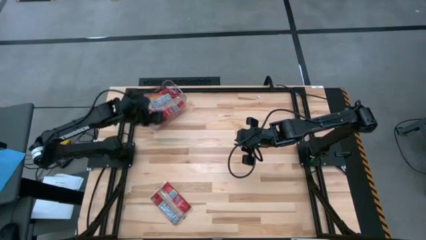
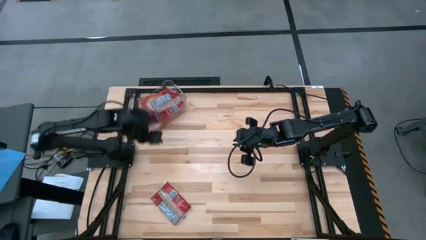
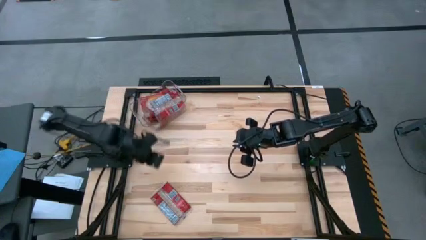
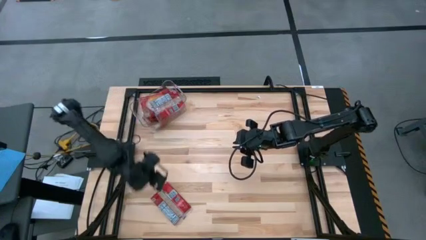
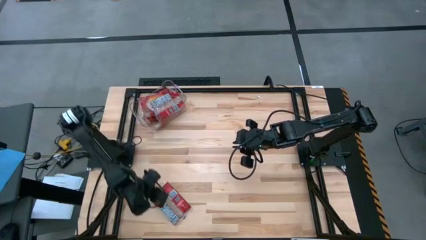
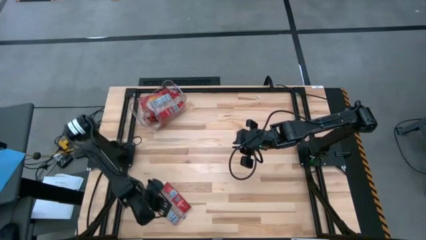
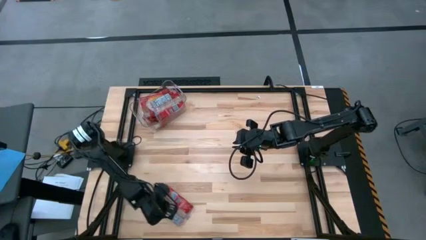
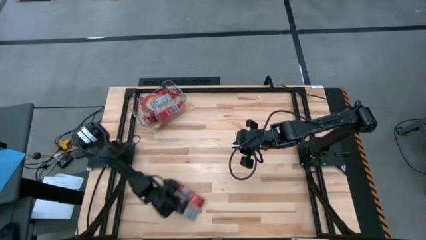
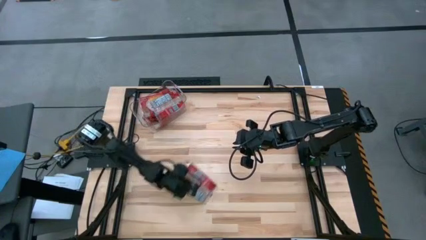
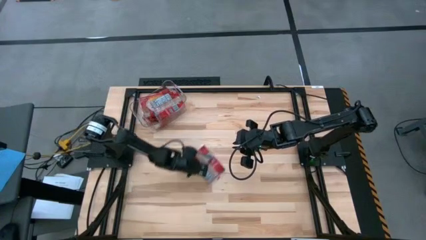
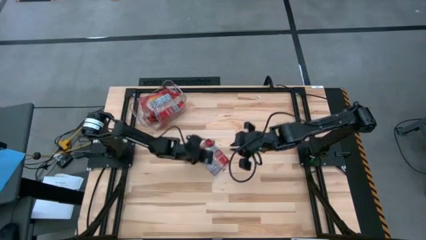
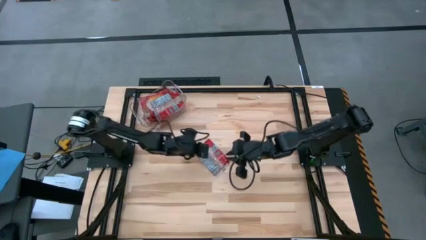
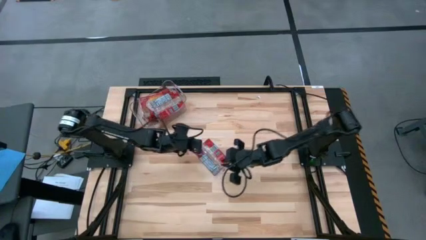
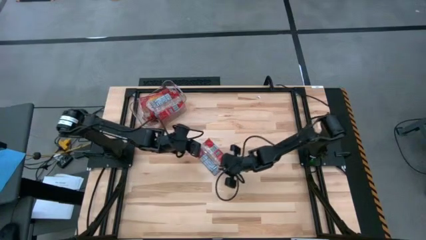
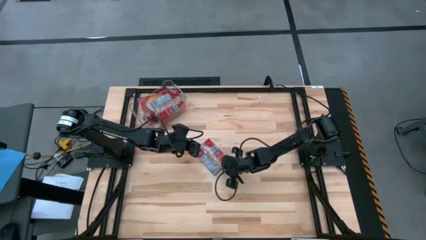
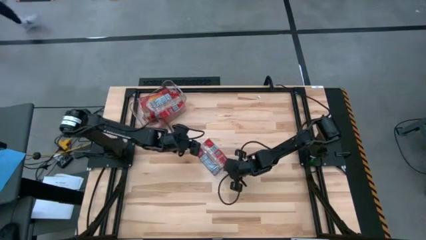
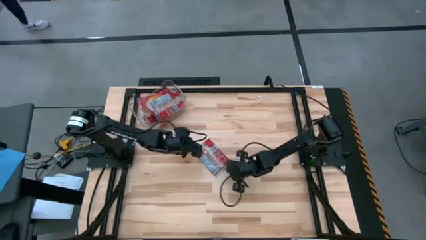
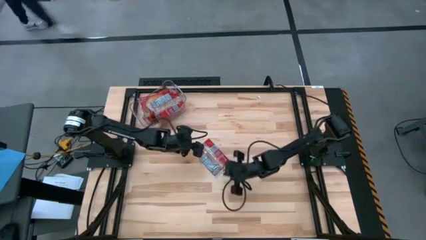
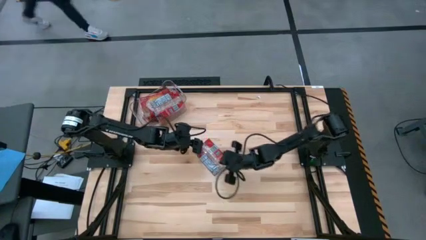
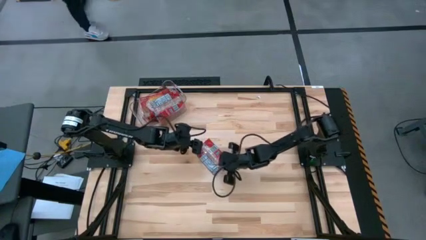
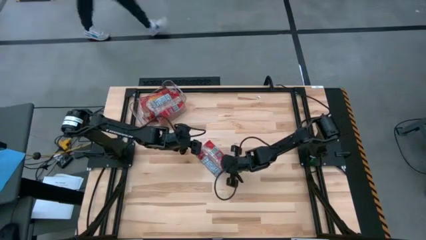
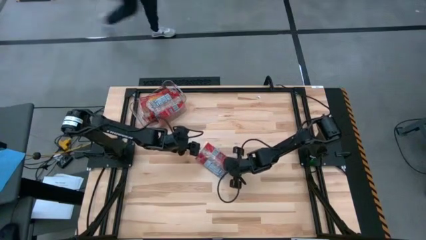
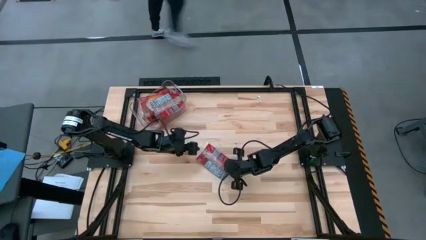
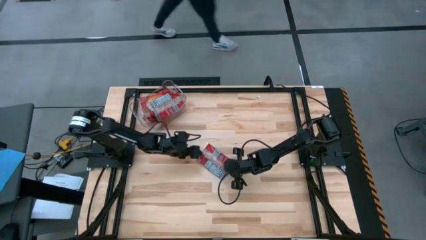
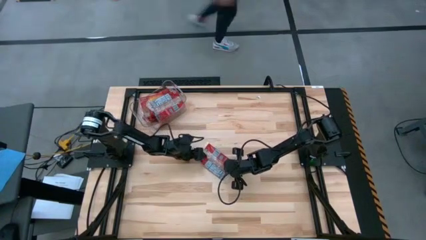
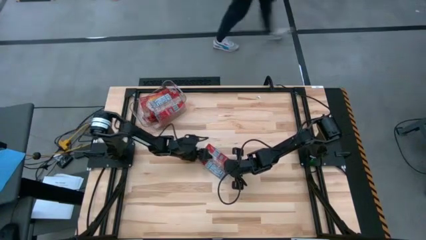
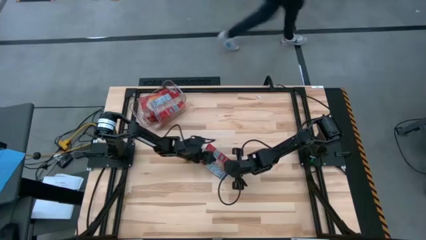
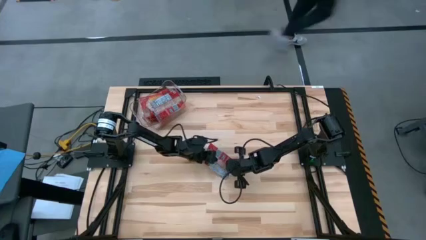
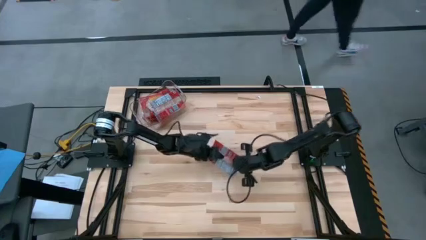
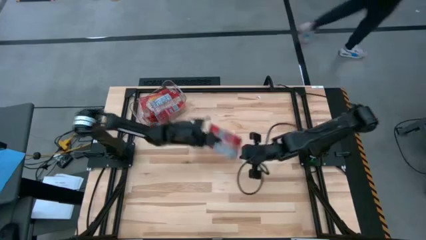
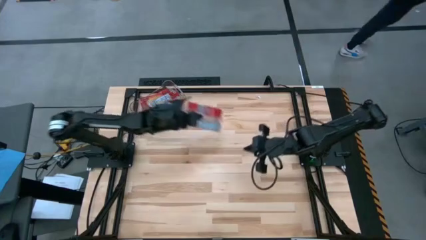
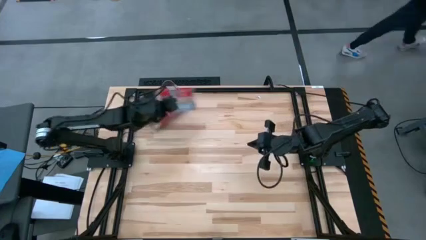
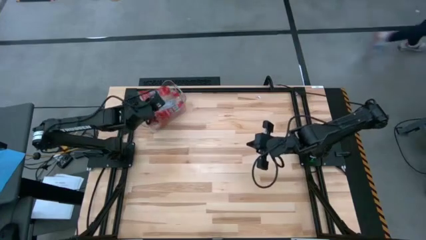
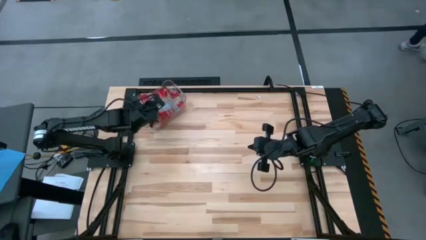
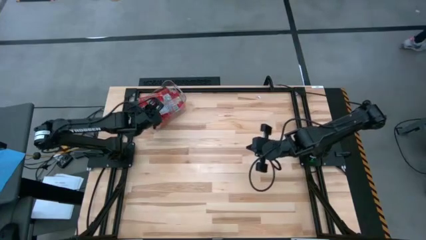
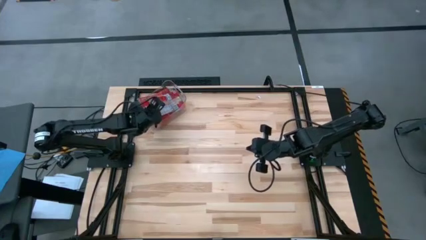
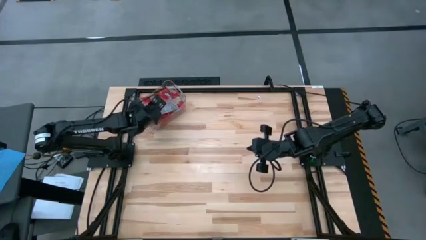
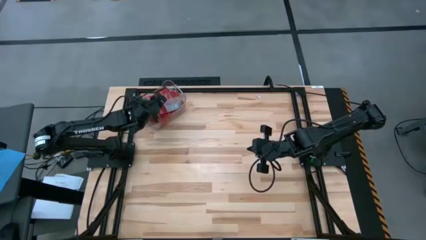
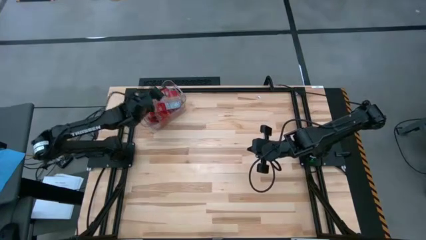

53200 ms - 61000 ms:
Task: Sort popcorn bags into baskets
Put the red popcorn bag into the transparent bin

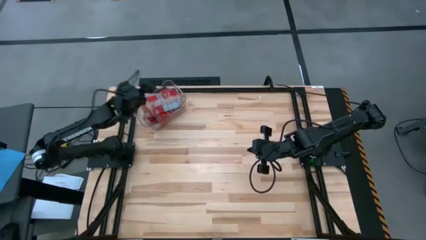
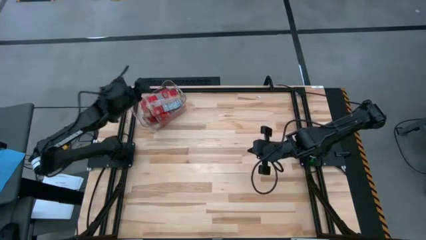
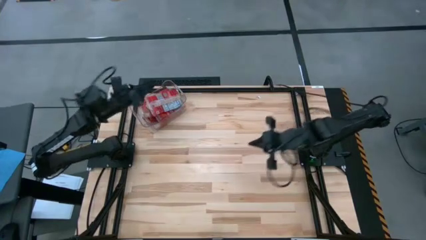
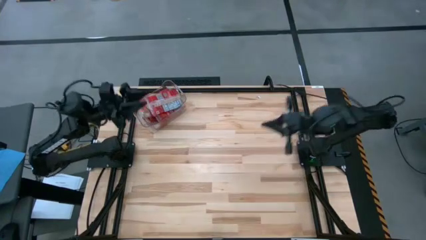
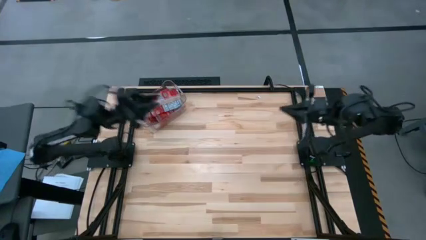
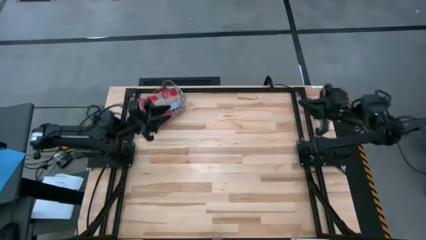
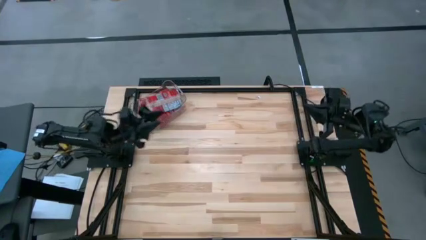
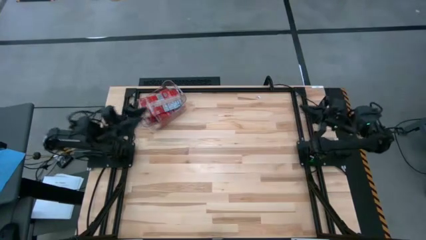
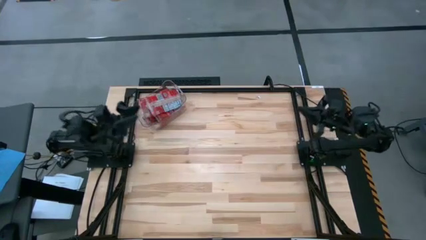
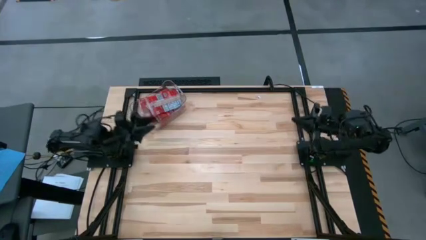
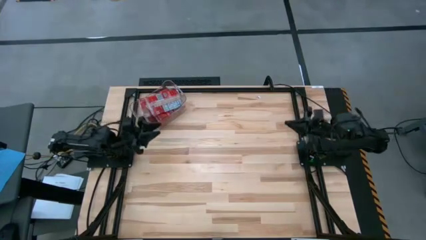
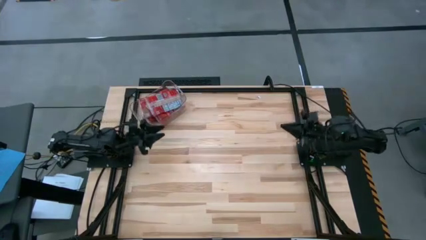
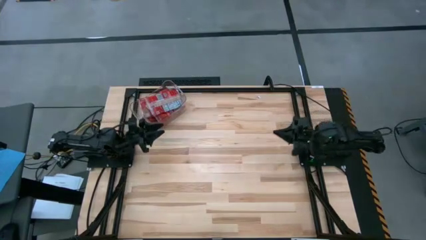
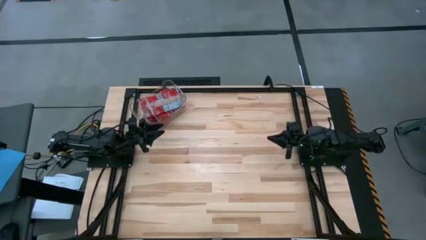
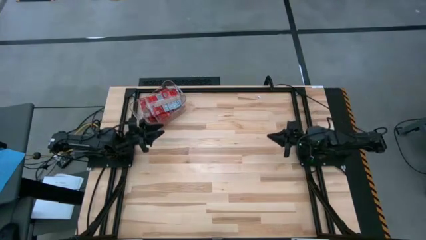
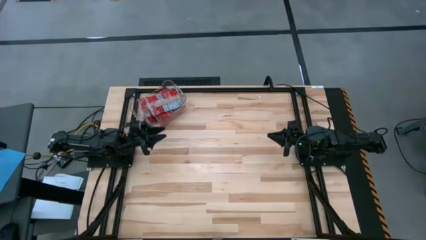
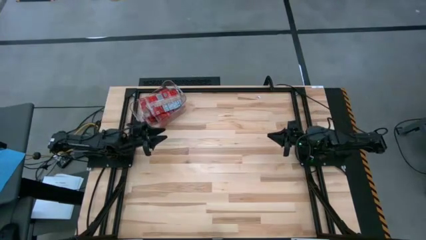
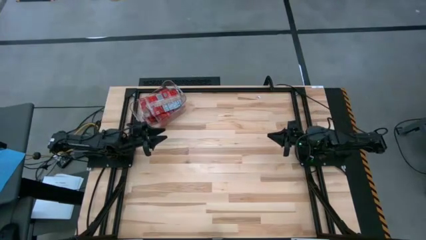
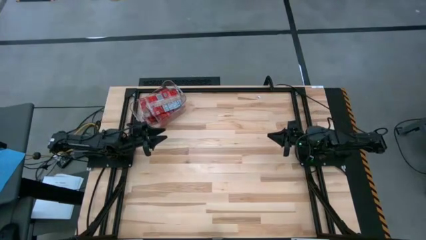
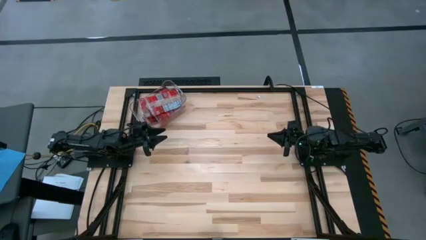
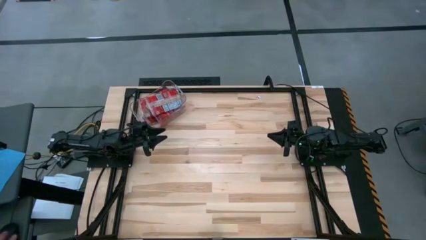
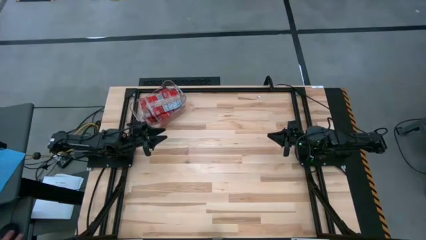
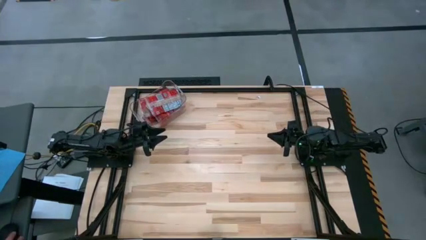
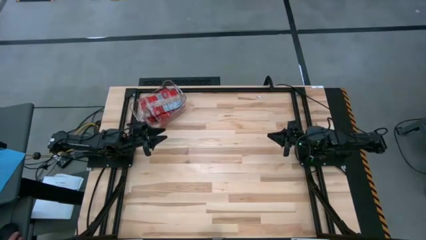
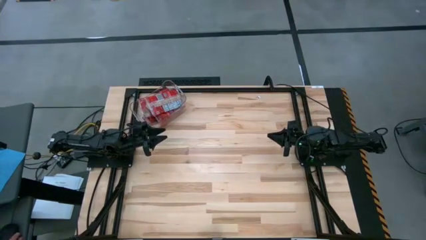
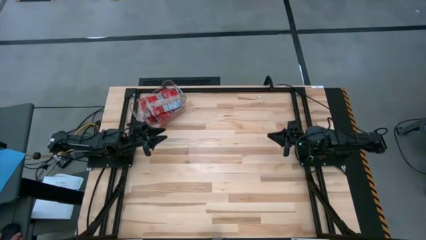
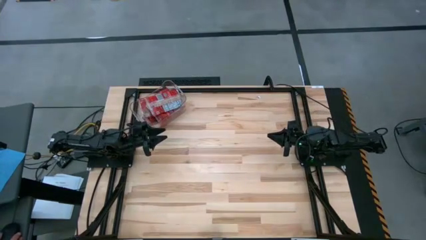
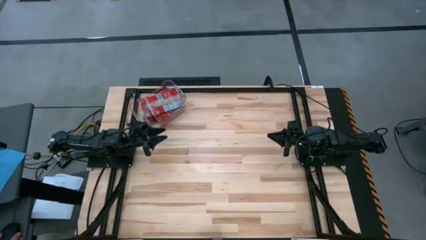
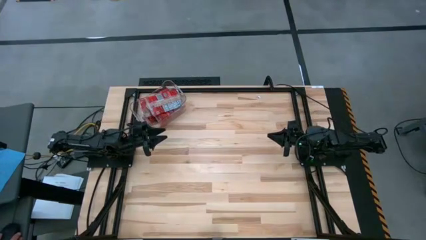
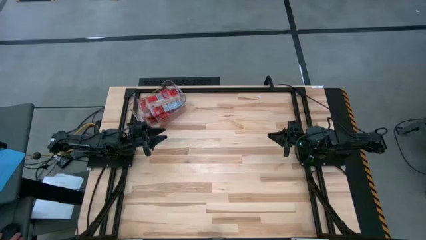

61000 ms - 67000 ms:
Return to Home Position
